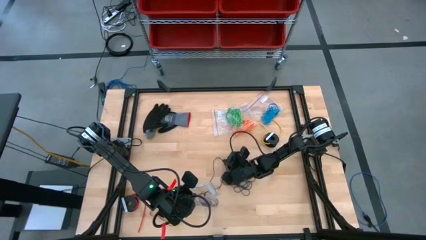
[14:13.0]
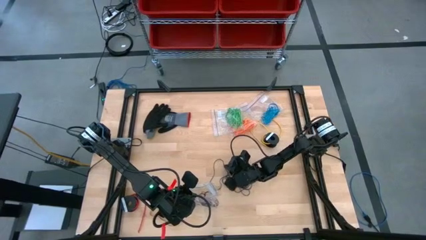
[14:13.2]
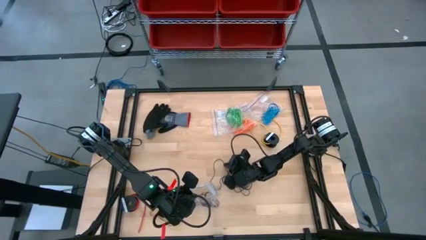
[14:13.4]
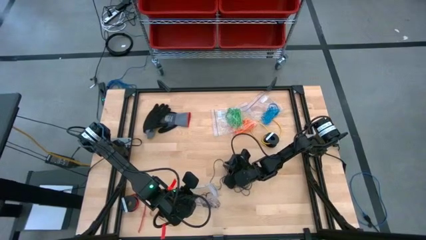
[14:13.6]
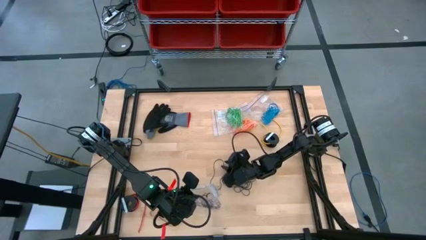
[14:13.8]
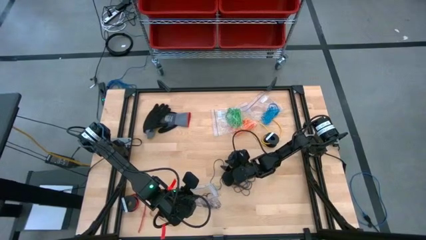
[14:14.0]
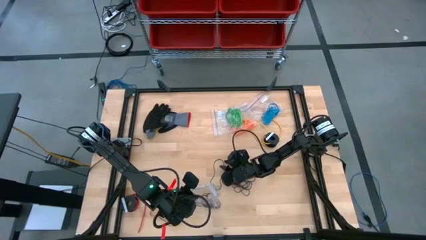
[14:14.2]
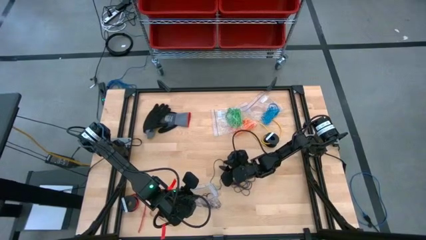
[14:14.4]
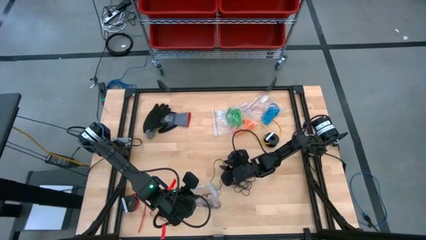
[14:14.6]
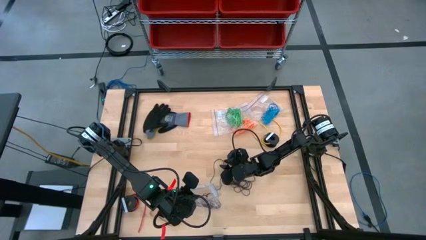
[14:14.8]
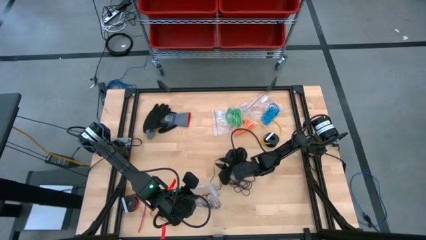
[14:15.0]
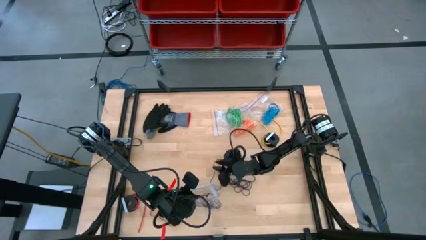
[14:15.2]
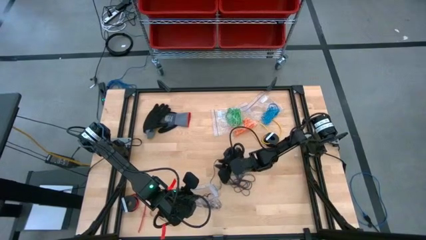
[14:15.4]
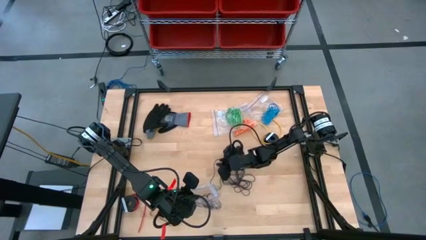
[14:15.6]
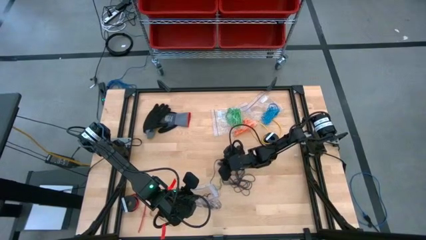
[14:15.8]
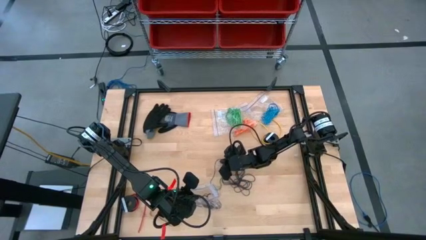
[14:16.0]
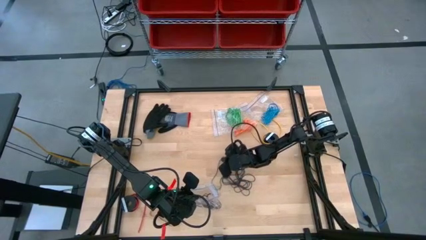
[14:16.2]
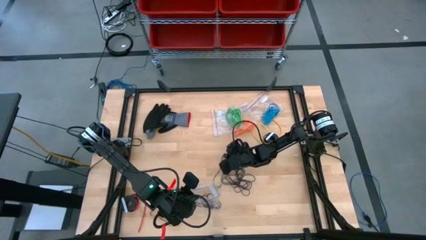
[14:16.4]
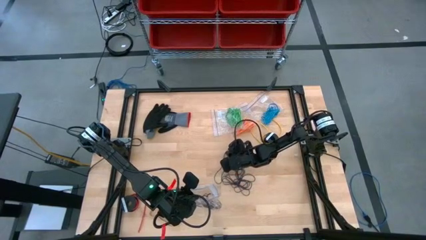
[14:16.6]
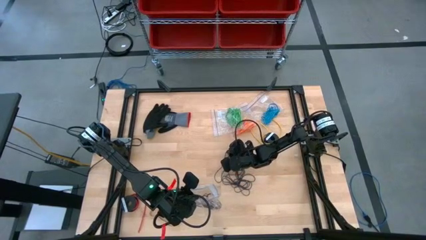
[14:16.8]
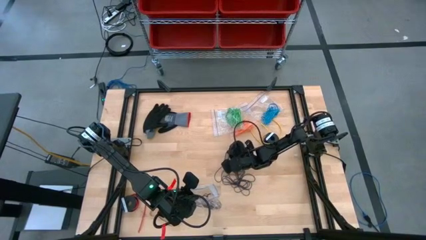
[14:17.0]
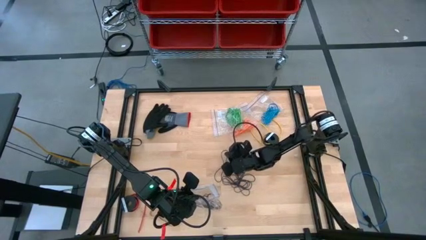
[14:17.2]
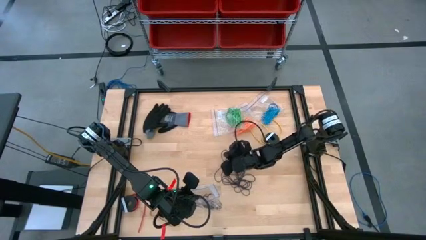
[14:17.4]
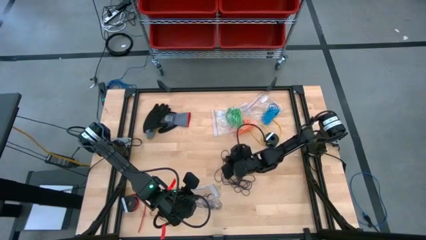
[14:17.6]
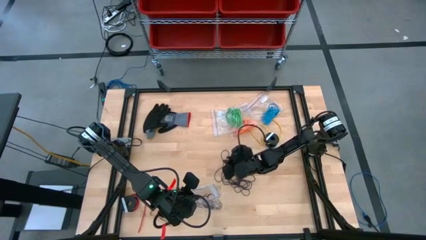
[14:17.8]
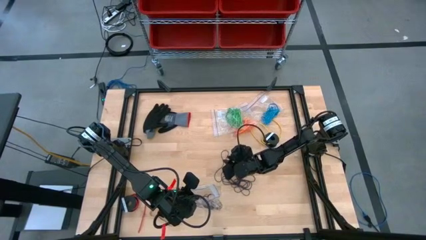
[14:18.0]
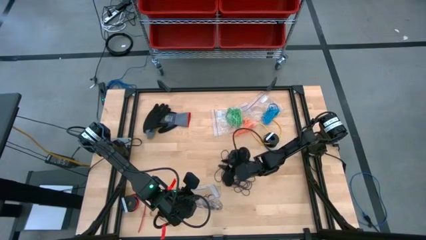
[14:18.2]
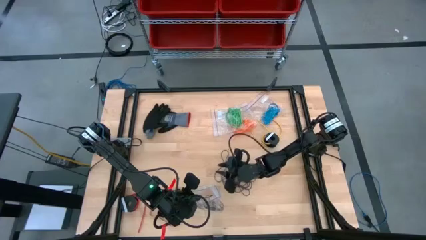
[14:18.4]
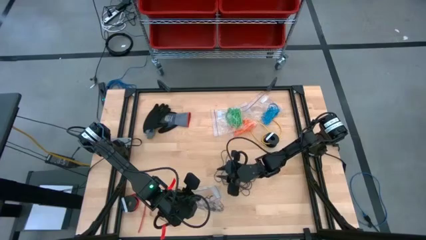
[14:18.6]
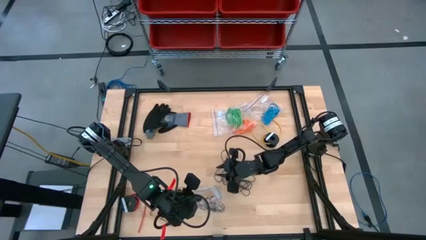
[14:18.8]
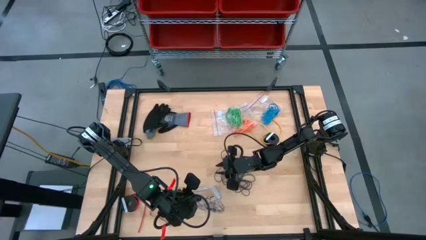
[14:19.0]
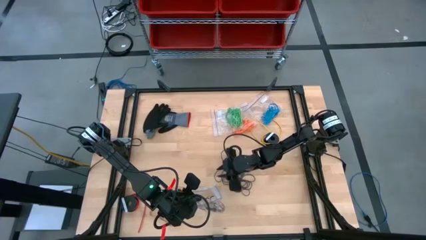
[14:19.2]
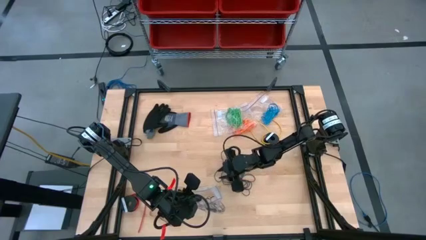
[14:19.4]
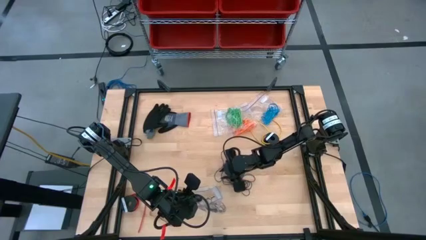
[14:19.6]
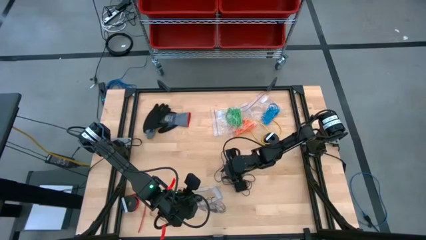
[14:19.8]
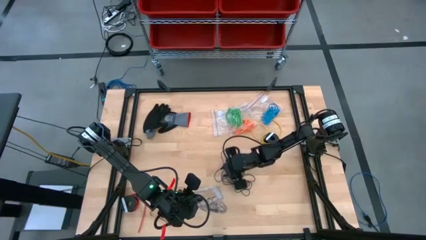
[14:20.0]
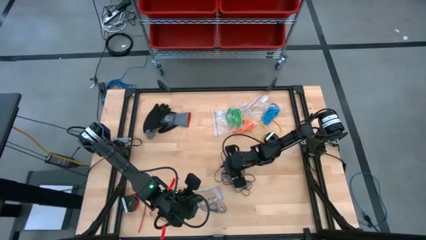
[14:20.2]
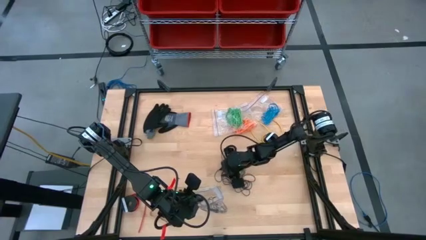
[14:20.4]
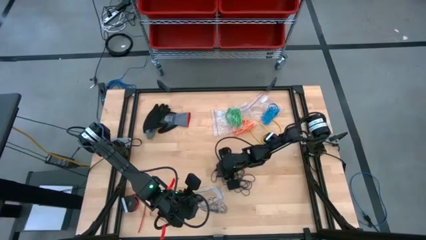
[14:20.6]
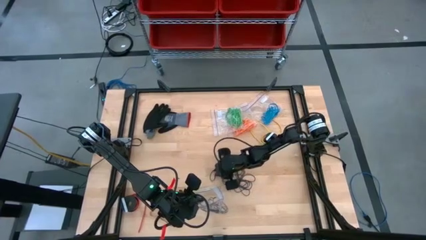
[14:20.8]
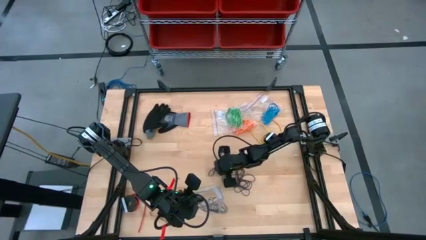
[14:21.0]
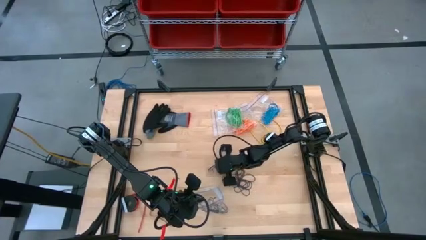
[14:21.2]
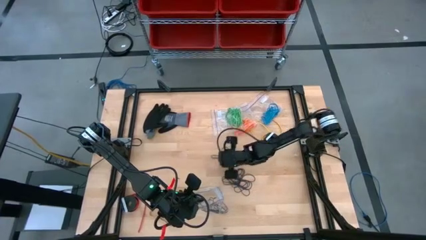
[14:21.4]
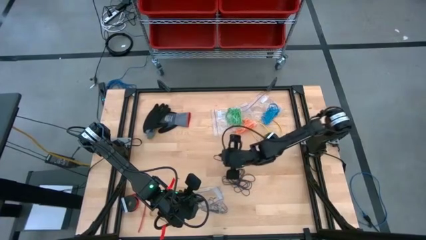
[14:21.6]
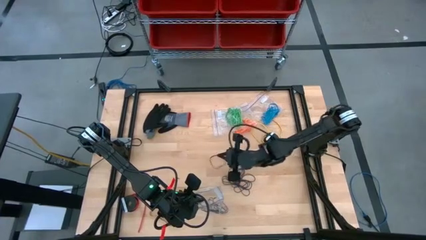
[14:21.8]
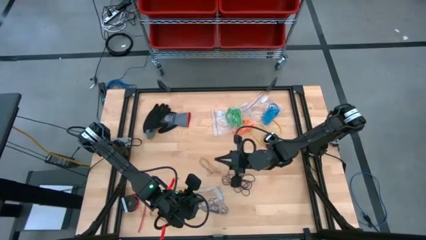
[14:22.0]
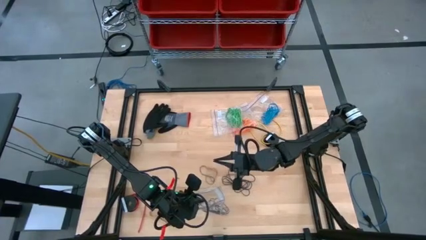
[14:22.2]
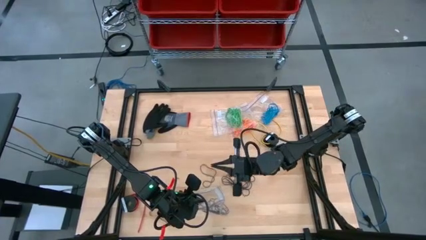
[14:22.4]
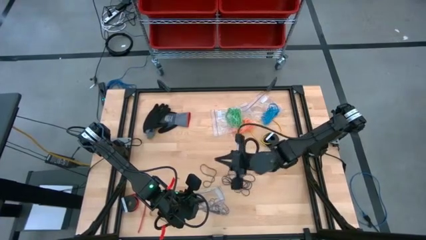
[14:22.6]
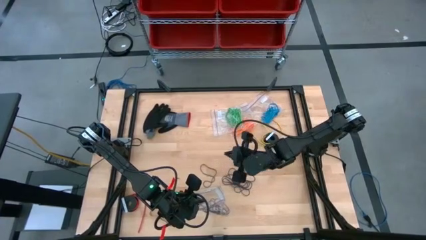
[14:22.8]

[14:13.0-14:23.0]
Task: Sort rubber bands
Put the black rubber band into the transparent zip bag

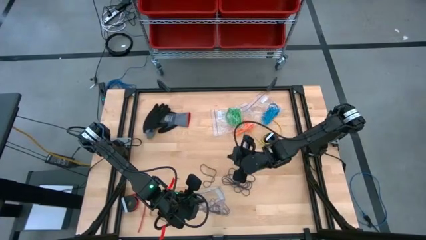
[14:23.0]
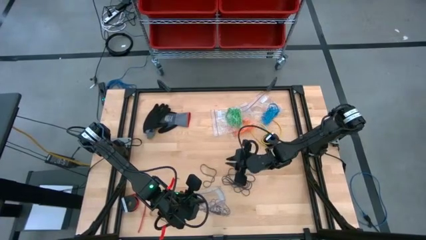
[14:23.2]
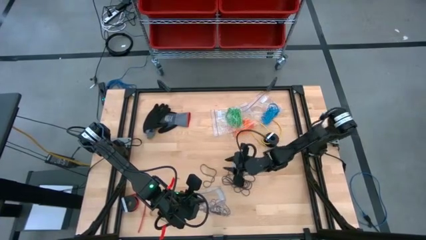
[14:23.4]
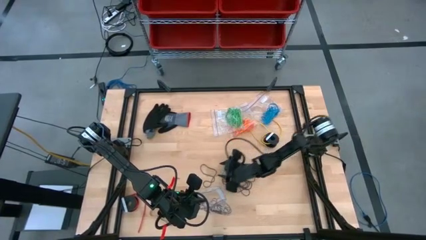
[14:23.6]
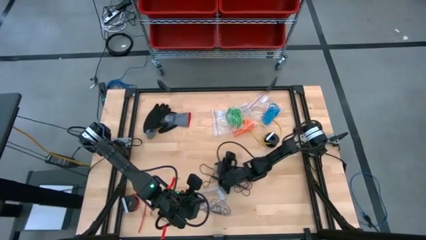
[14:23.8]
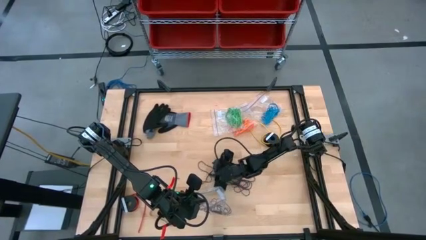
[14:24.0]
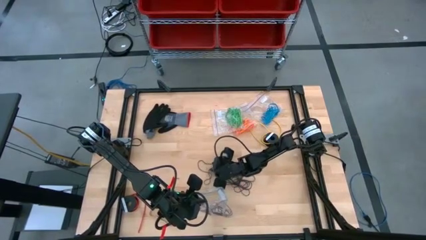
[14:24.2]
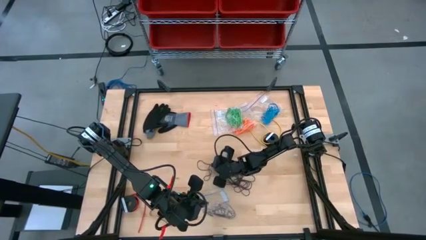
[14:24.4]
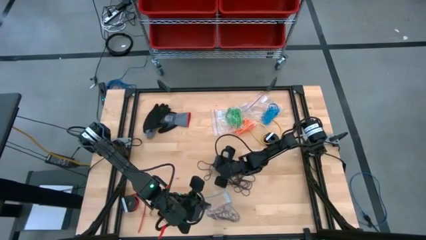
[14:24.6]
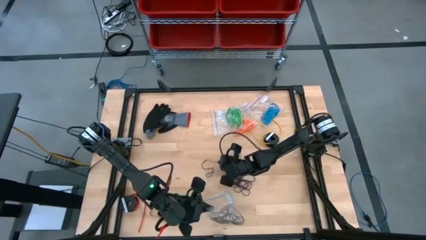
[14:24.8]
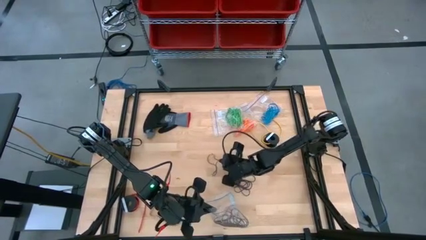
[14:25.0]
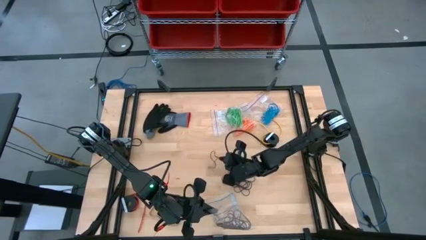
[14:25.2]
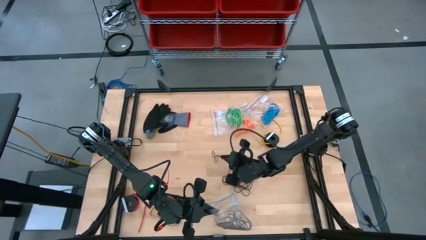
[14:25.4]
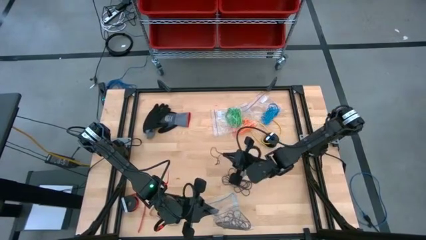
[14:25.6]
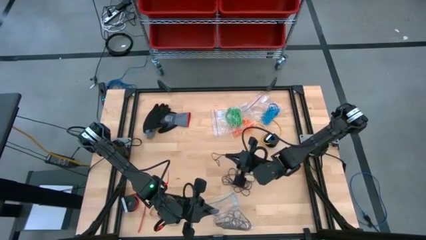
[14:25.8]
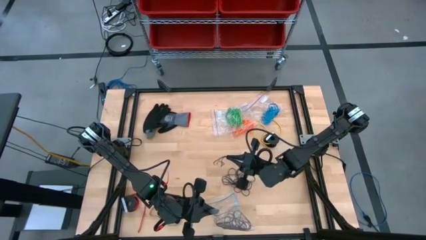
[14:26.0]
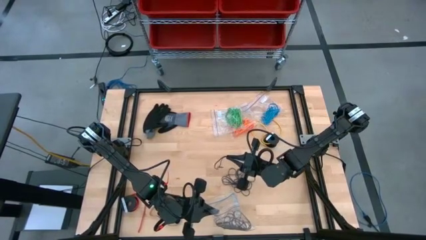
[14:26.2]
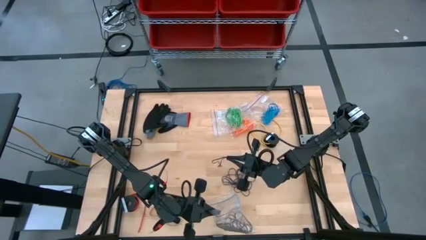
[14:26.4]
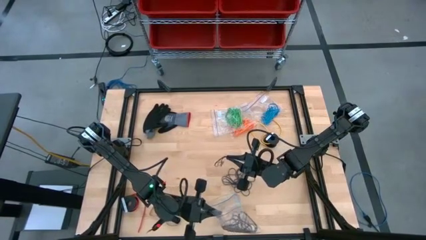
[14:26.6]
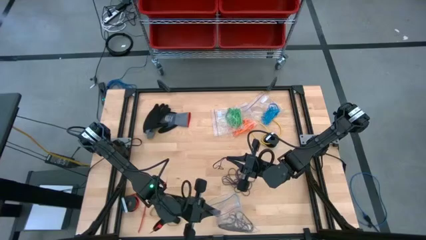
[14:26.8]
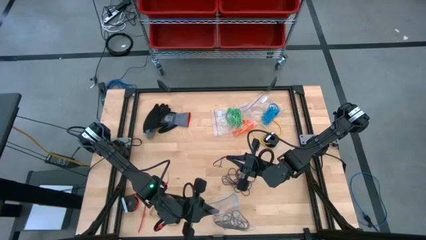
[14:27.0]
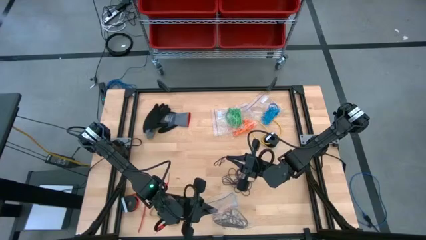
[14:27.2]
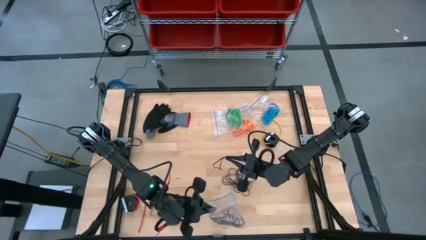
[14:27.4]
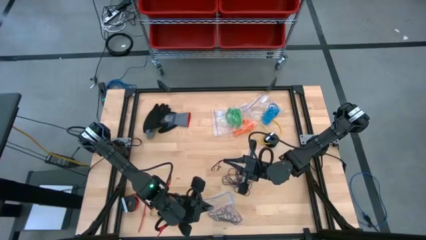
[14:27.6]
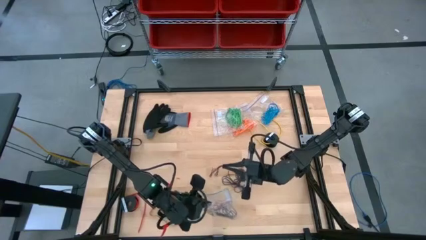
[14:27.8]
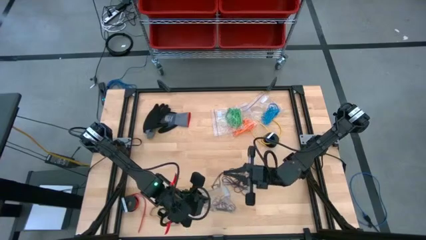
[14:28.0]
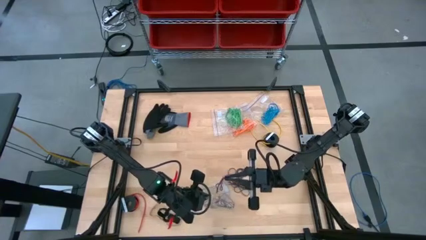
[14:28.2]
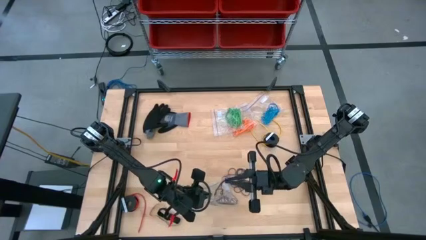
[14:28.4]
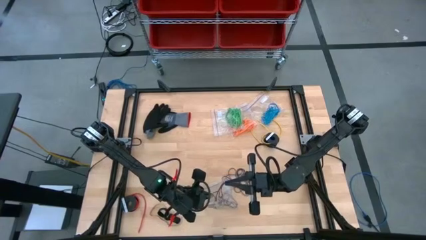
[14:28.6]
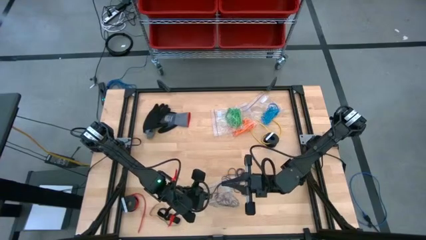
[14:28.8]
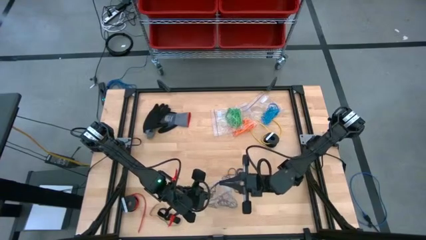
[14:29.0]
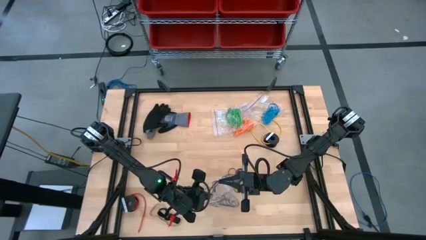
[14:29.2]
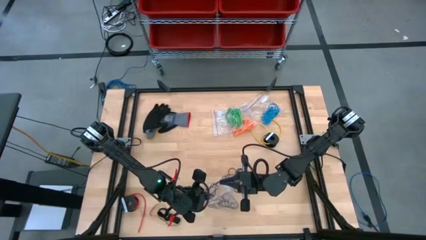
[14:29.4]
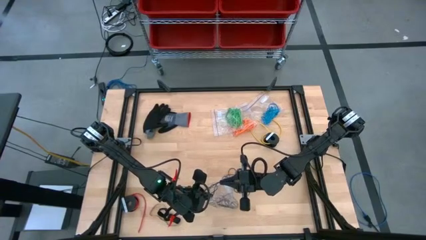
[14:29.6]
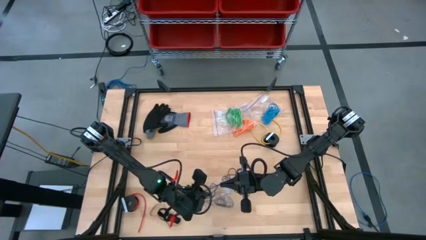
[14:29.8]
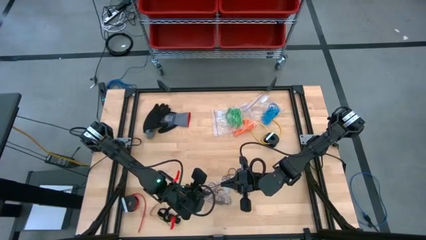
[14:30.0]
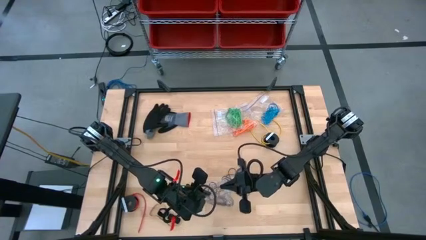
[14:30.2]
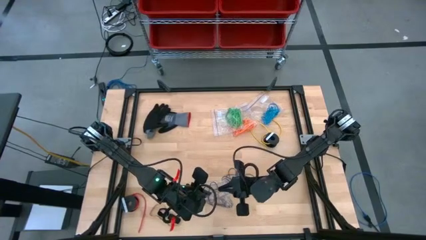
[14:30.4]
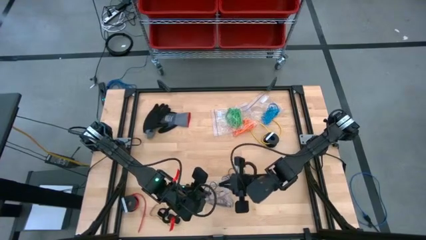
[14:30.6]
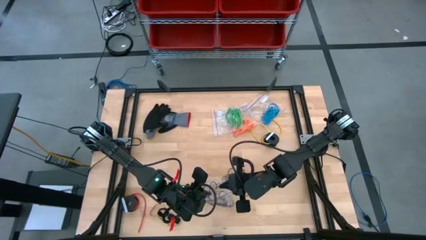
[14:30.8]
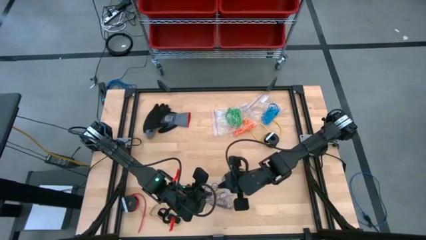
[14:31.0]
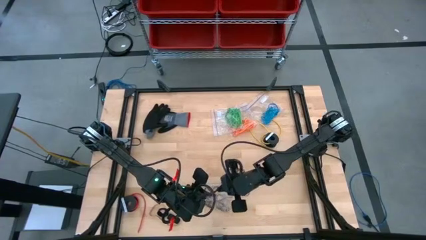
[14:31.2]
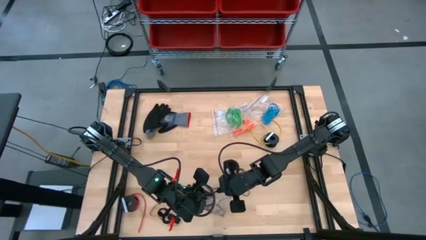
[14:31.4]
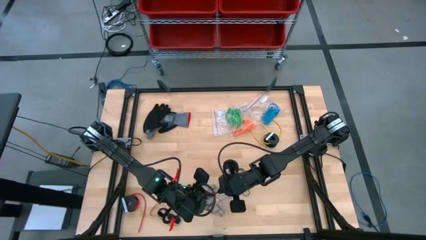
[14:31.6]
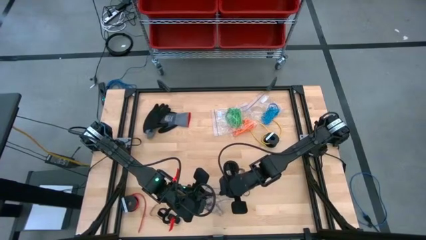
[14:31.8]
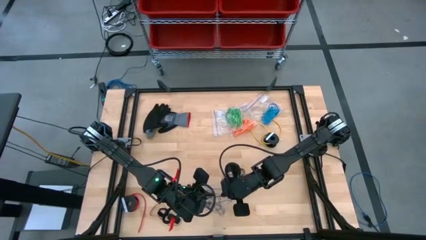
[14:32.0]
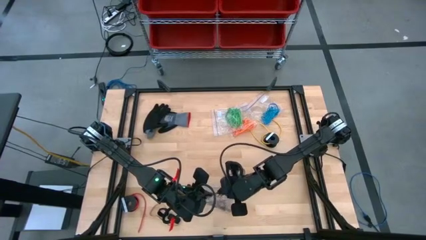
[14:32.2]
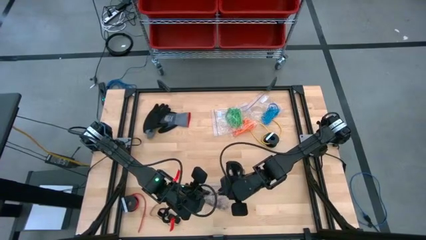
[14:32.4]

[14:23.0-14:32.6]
Put the black rubber band into the transparent zip bag
